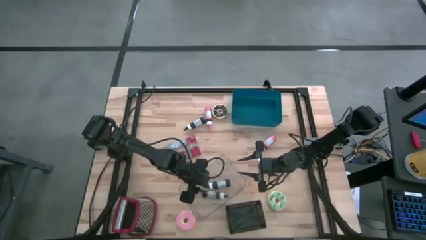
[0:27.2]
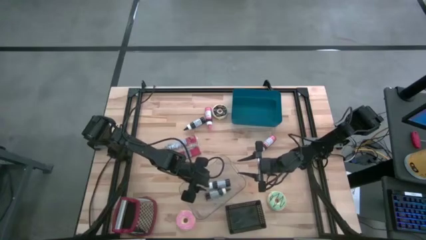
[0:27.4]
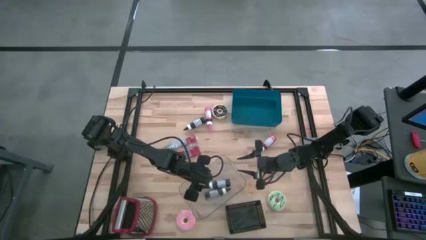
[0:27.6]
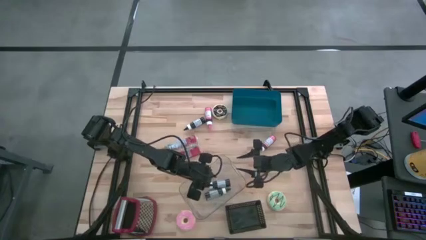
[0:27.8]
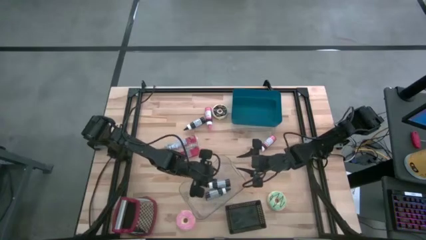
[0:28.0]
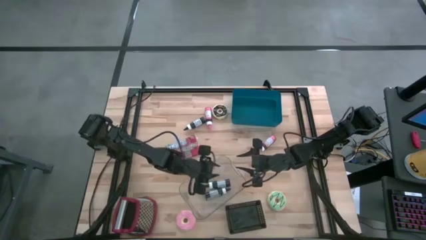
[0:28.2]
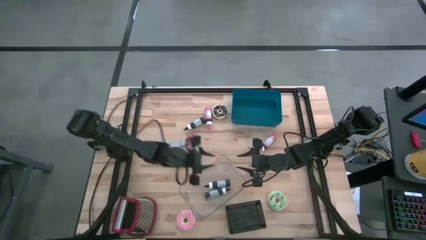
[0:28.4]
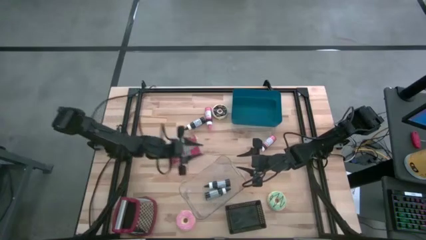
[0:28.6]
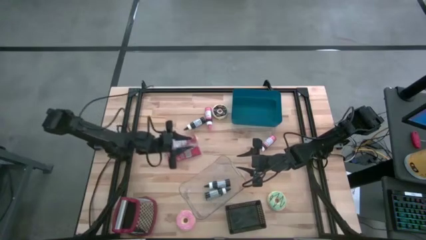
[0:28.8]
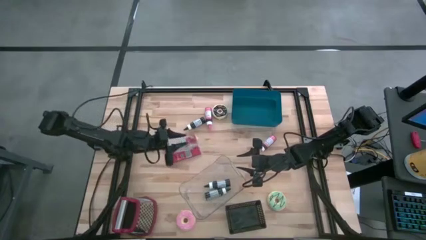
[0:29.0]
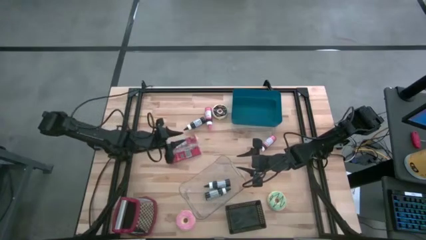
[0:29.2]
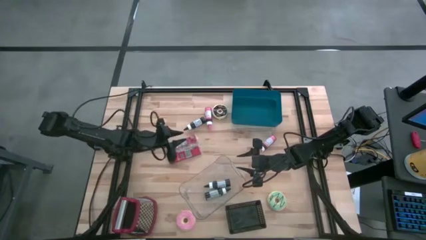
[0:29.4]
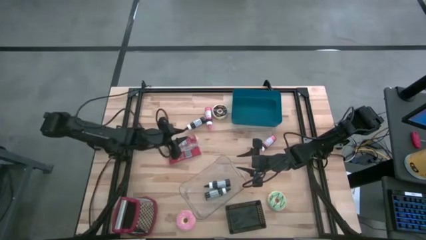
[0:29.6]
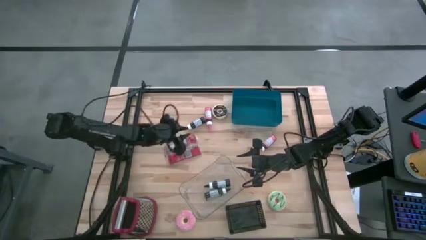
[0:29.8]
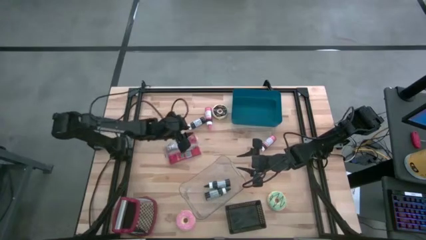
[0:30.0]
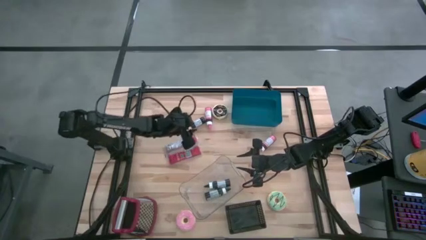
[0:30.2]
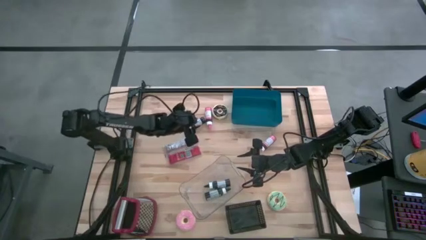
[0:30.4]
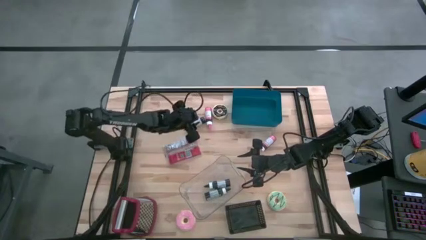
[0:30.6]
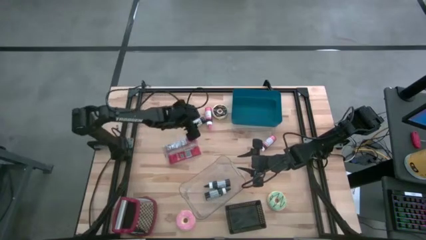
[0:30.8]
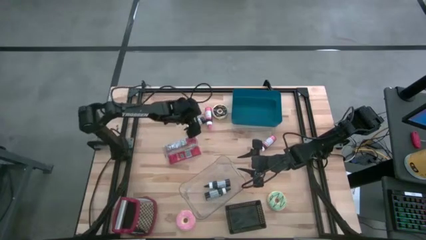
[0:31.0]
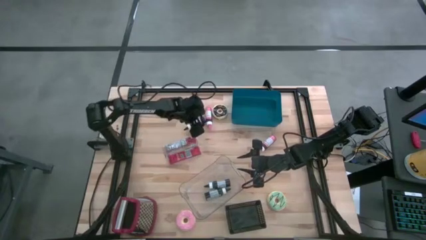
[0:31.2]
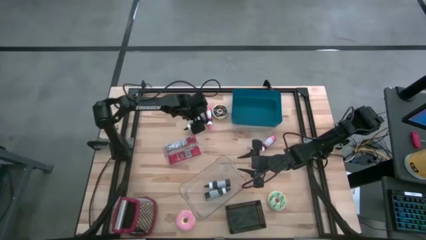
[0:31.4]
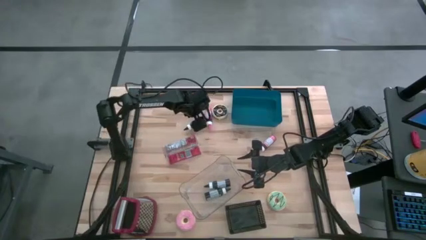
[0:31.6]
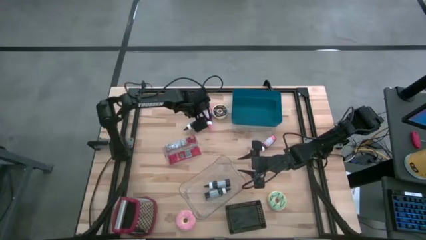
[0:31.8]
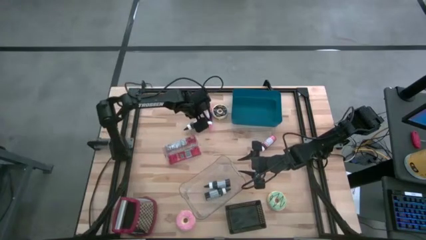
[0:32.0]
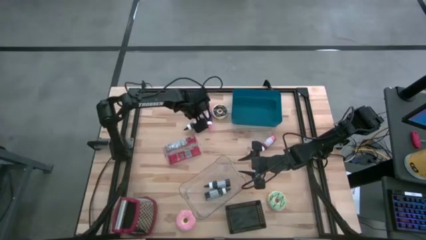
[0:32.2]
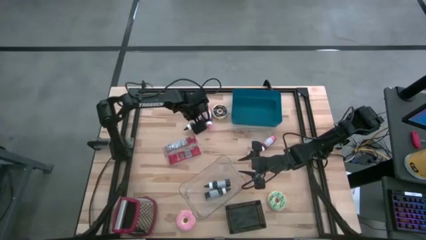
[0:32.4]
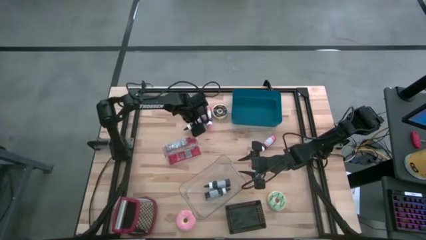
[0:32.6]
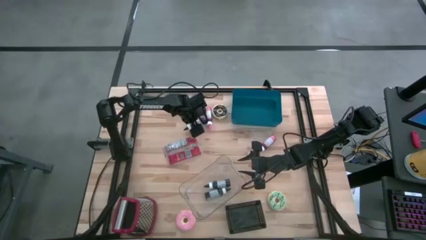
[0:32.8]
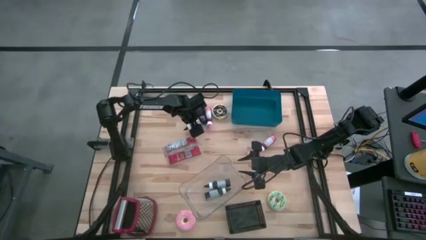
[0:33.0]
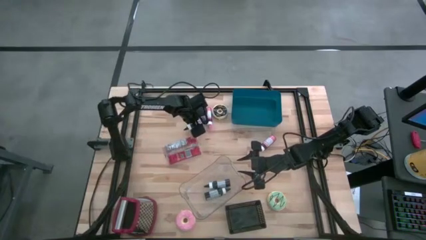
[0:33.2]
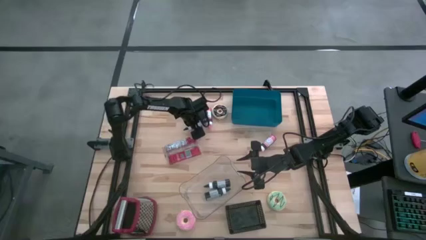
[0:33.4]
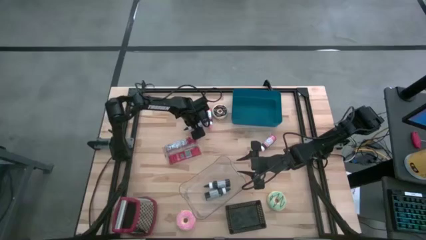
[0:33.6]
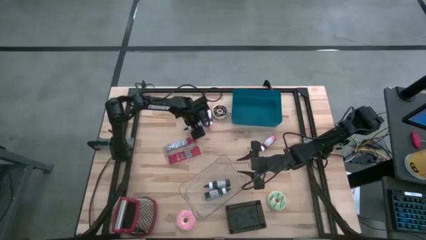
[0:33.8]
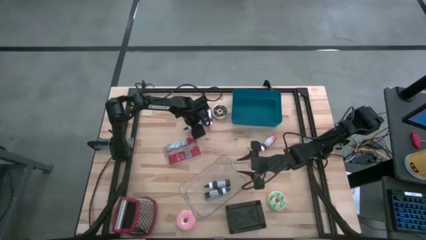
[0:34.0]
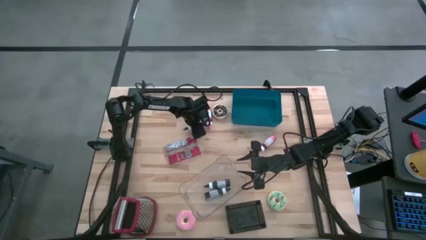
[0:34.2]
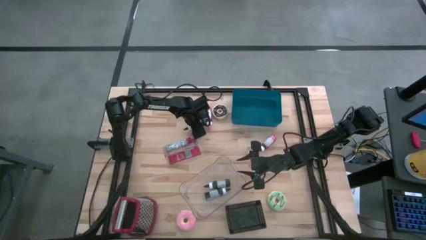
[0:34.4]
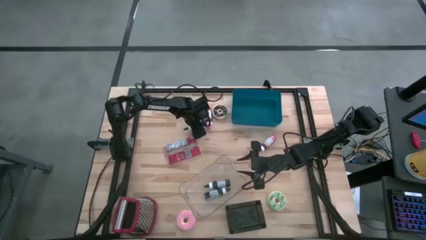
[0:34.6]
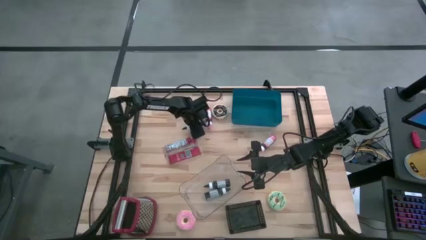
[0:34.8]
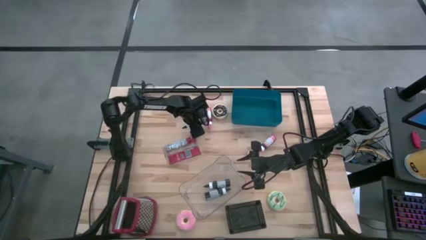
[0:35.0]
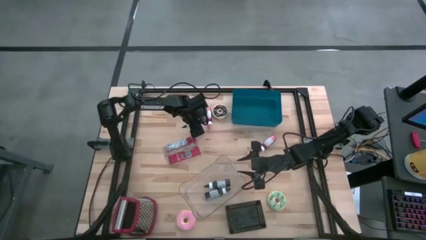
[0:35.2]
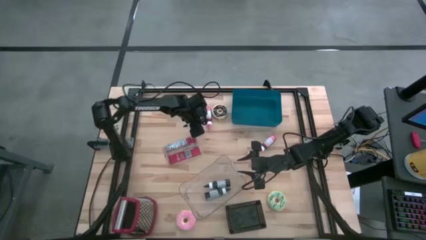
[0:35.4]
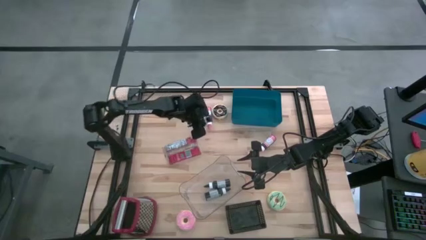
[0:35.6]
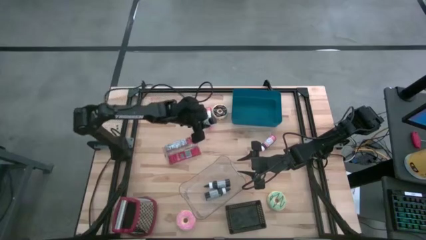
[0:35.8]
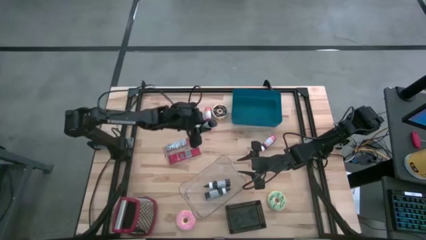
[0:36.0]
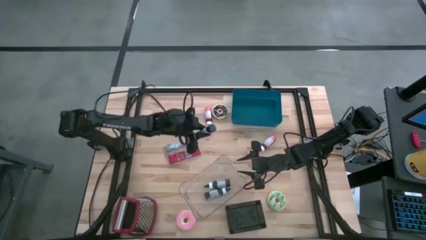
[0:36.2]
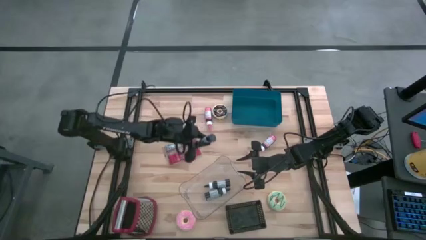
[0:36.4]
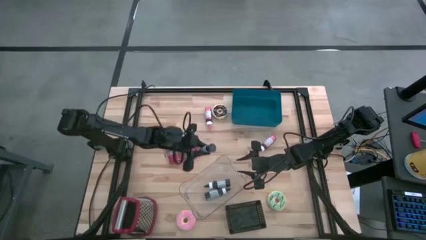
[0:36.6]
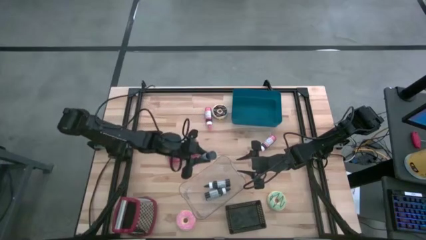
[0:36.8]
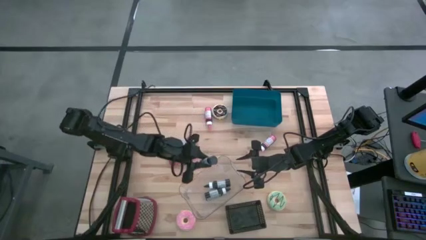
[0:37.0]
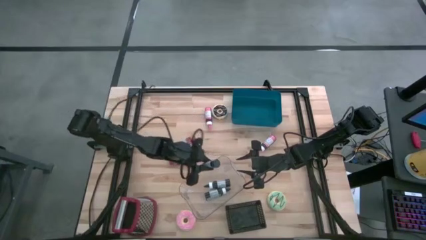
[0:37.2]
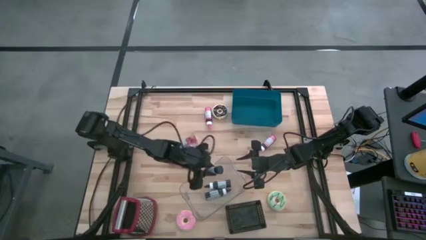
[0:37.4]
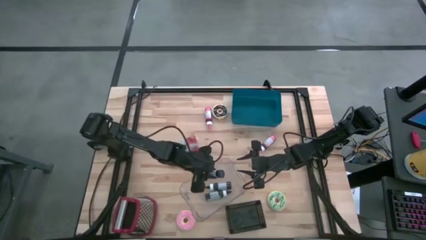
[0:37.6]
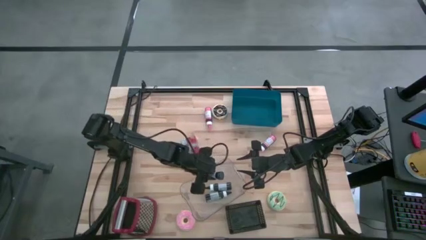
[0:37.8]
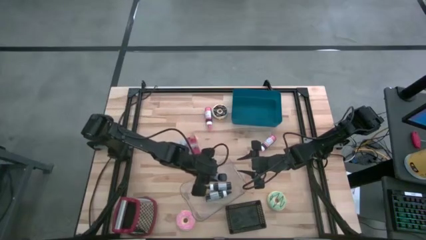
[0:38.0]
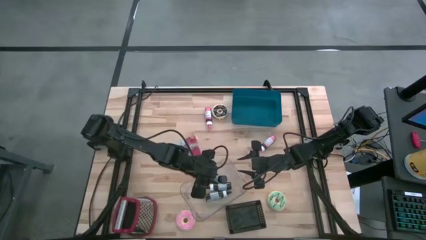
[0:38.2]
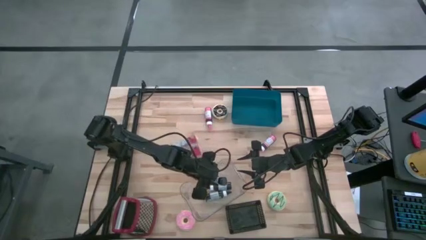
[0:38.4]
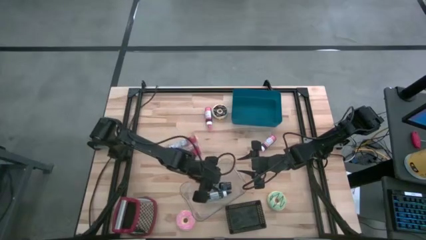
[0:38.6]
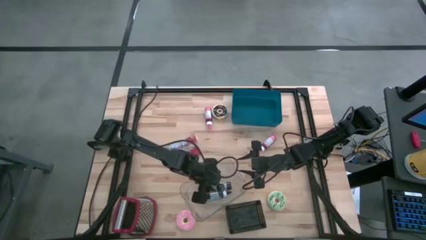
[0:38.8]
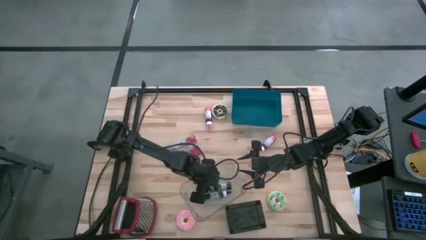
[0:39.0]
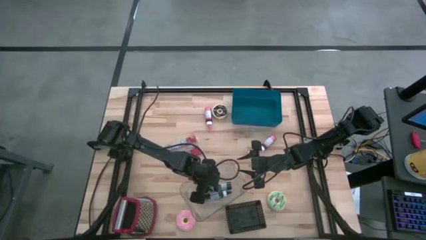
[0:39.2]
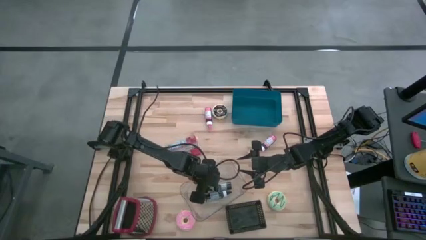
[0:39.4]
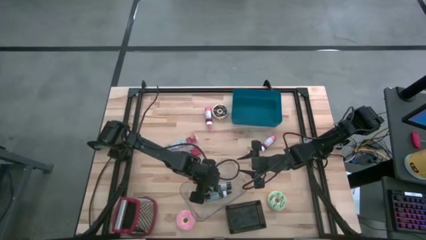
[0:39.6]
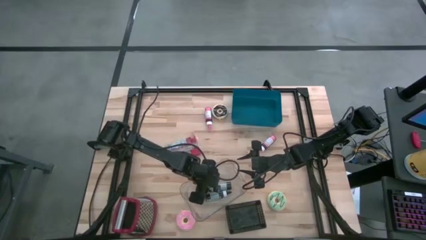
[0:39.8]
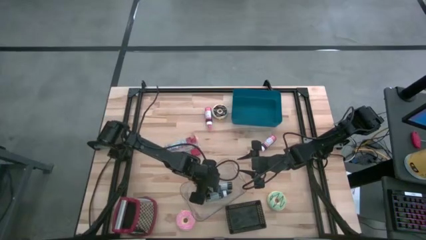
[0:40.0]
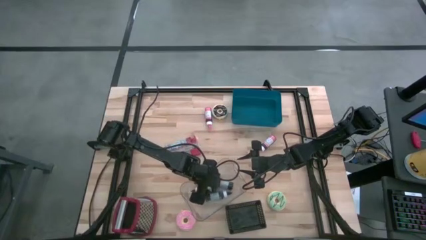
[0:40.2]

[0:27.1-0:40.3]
Put the black food coloring bottle into the transparent bin
